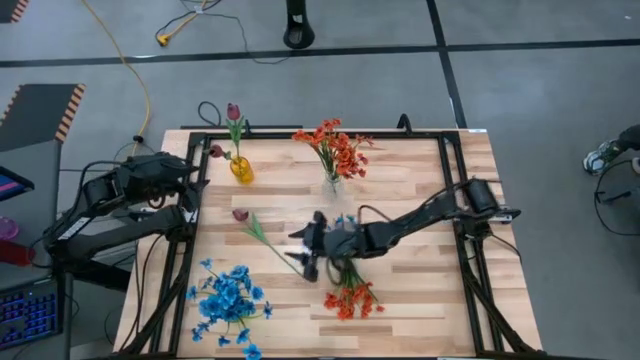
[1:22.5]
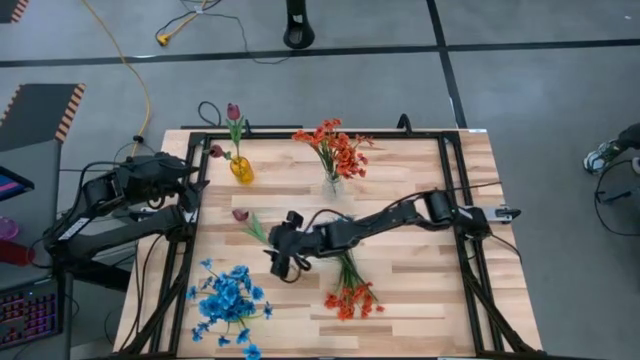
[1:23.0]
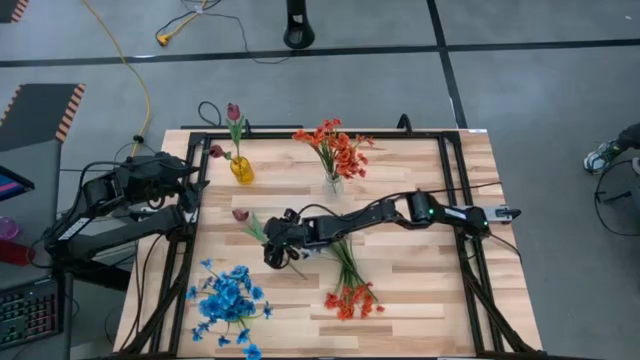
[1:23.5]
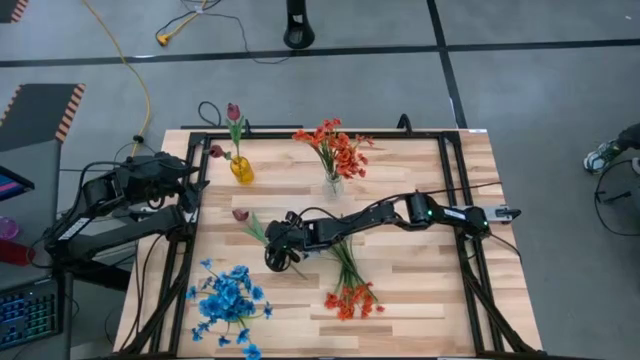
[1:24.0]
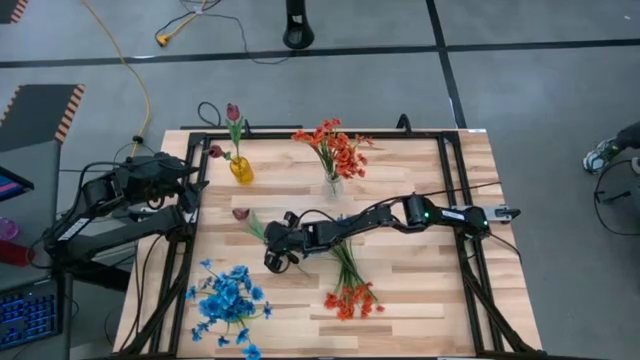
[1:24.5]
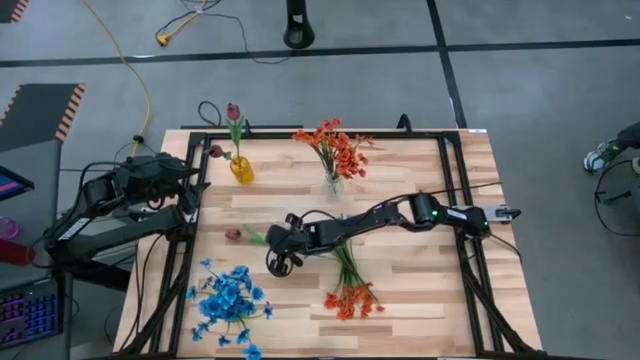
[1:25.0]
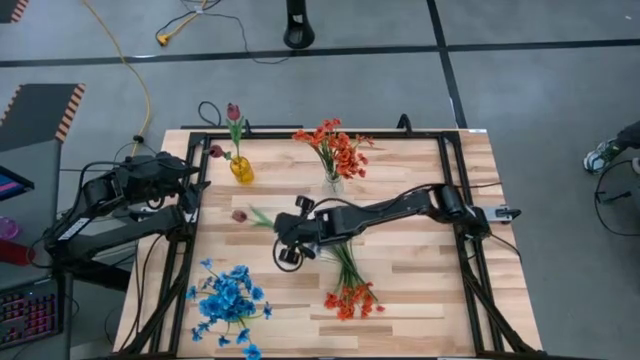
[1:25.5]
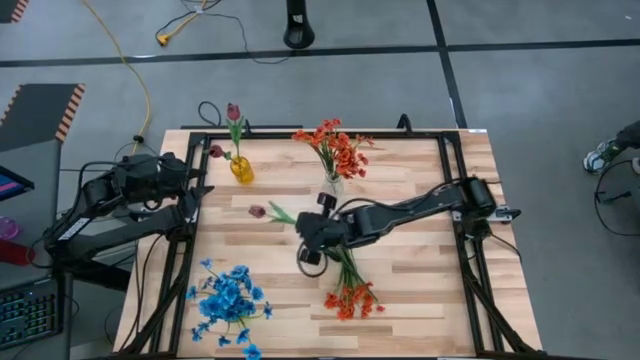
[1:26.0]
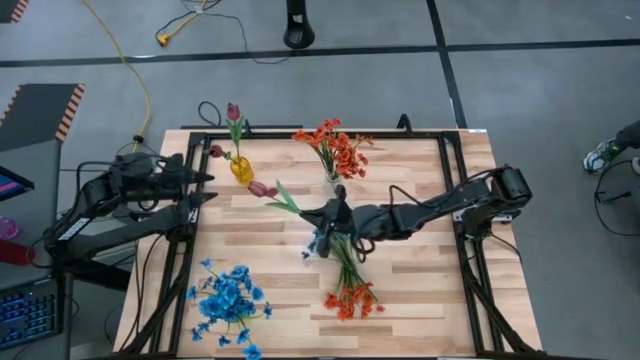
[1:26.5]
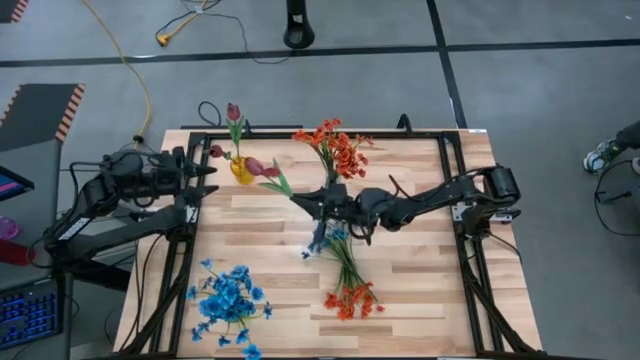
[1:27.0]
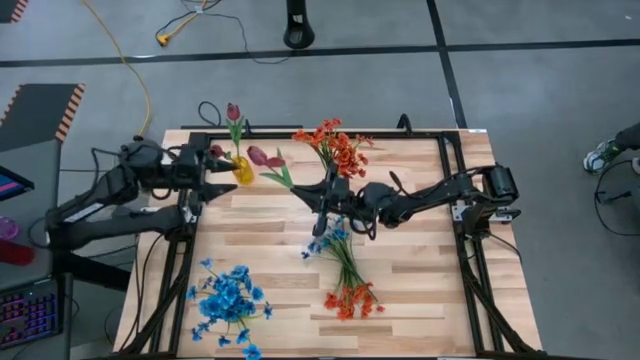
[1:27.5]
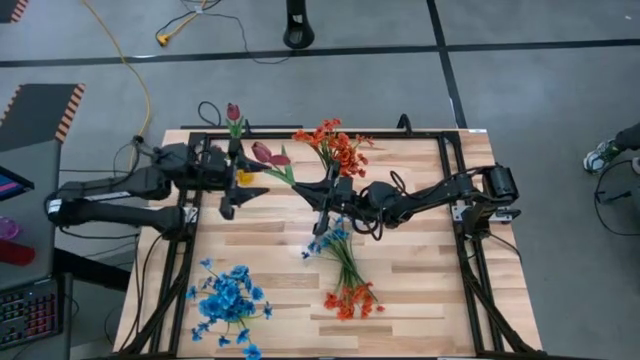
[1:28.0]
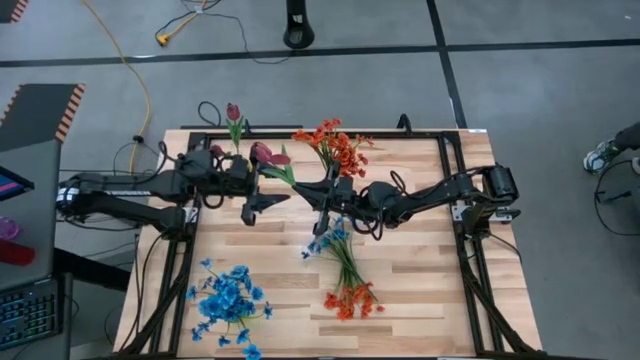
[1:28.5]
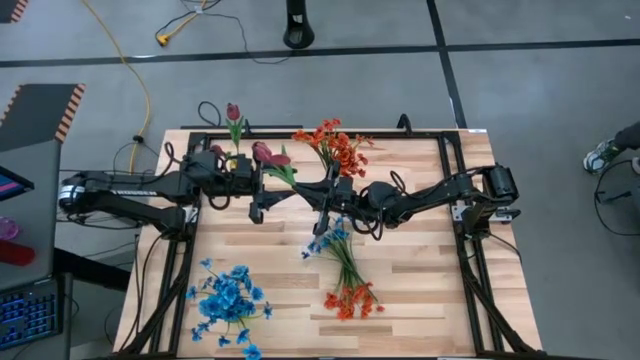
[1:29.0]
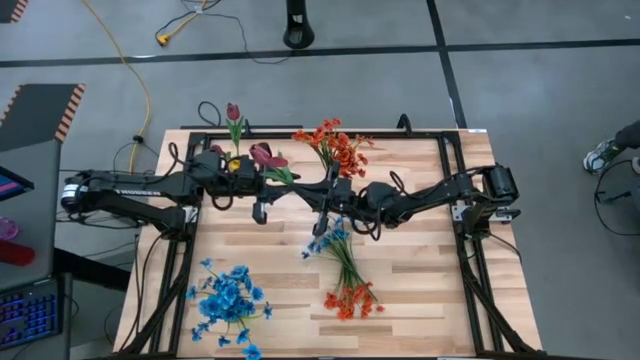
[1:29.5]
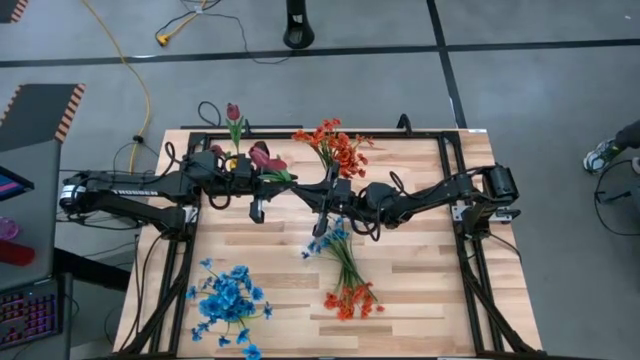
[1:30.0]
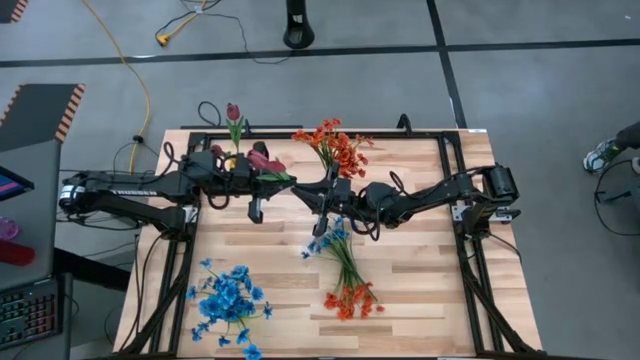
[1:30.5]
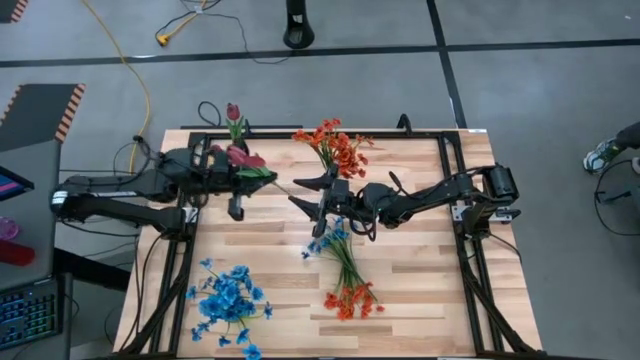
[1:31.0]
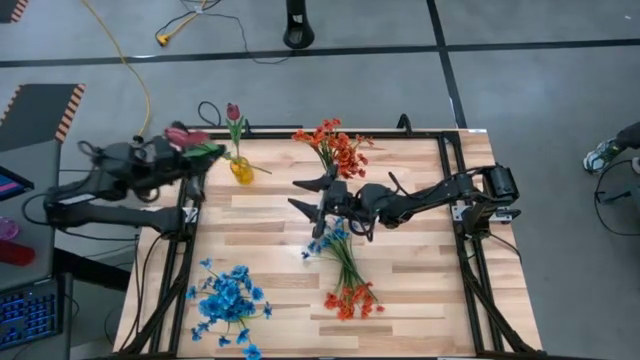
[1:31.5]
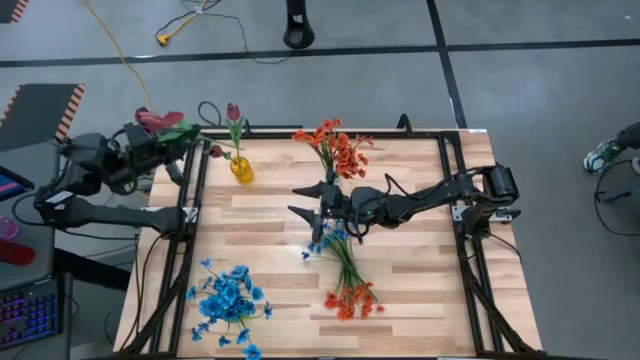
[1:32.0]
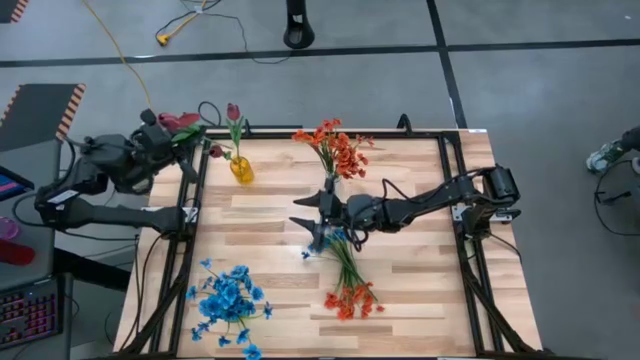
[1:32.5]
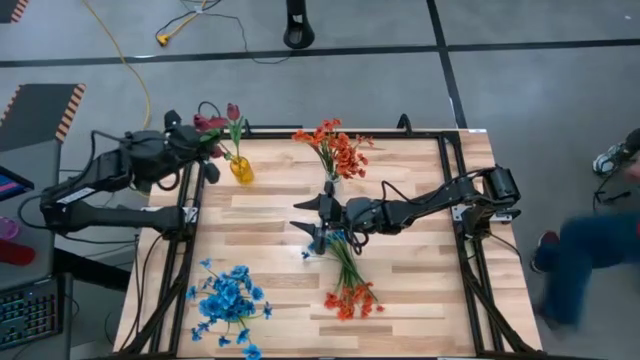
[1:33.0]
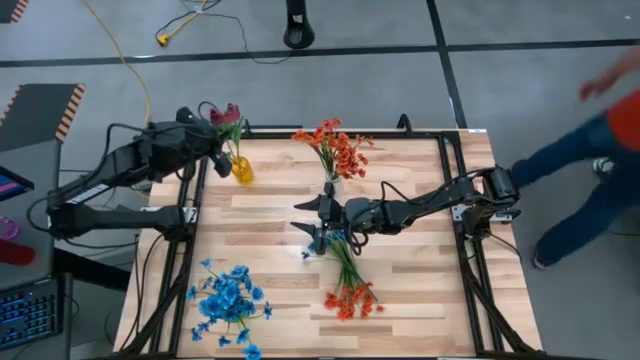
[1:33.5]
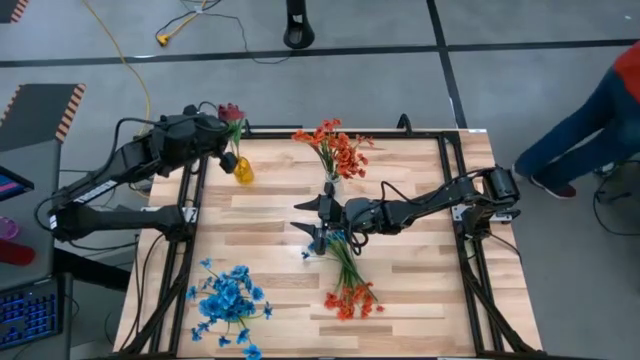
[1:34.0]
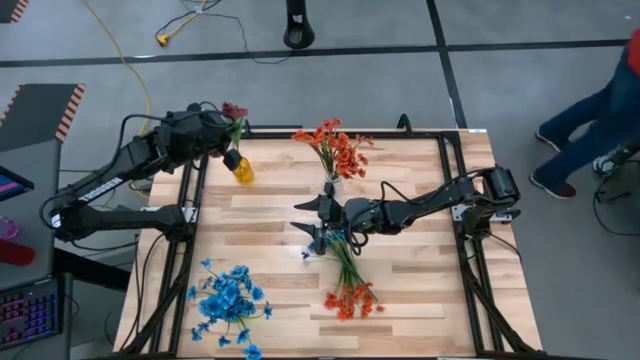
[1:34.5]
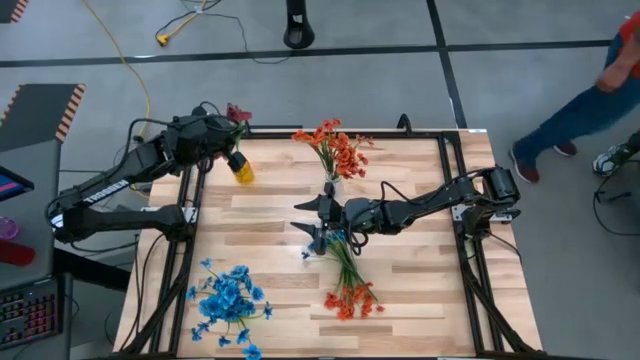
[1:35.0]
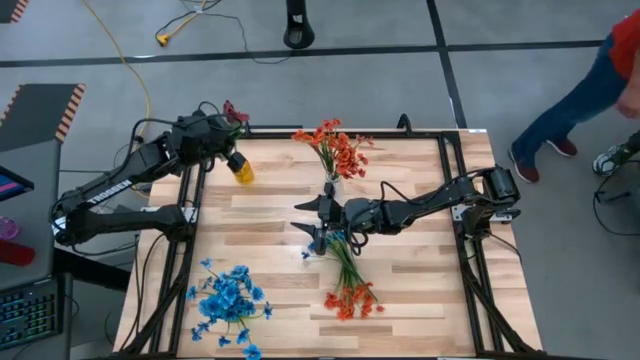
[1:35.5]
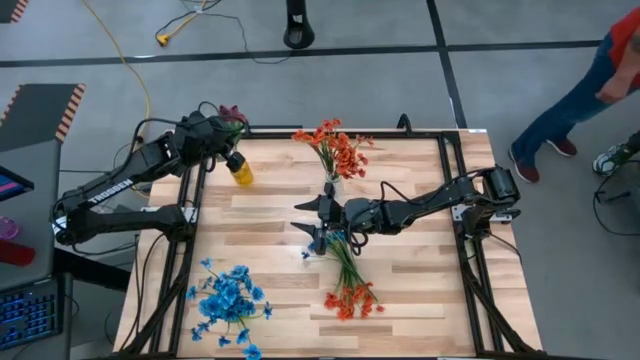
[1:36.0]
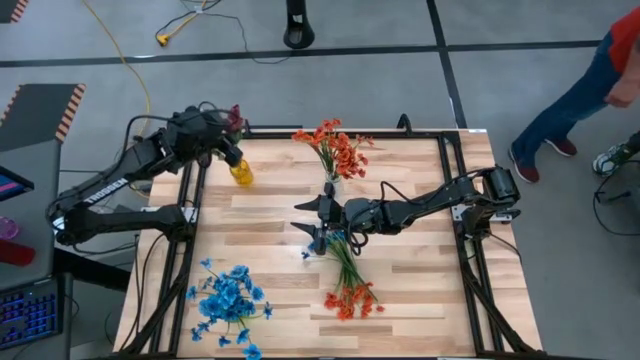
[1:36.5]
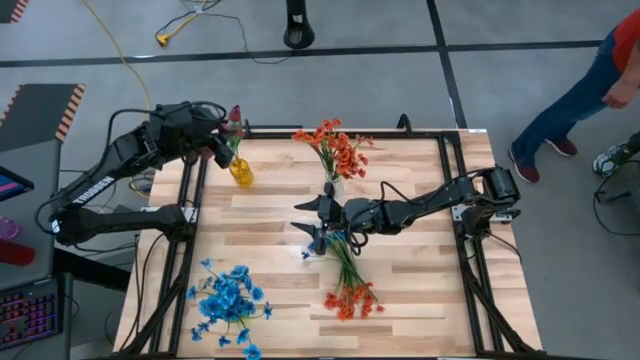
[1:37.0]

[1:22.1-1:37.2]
Task: Sort flowers into vase by color
Put the red flower into the yellow vase

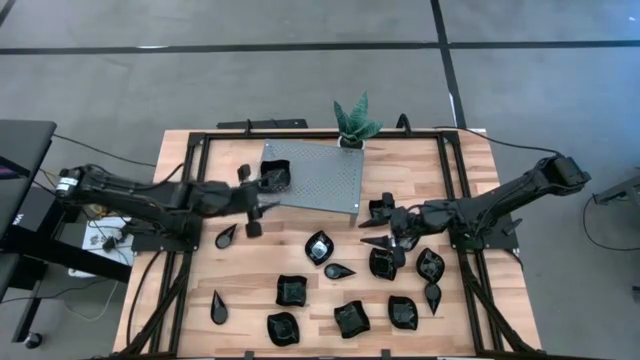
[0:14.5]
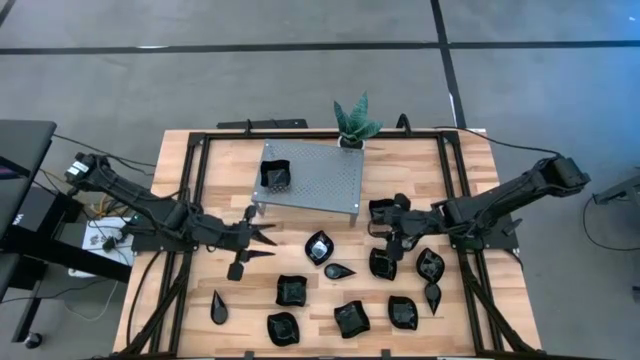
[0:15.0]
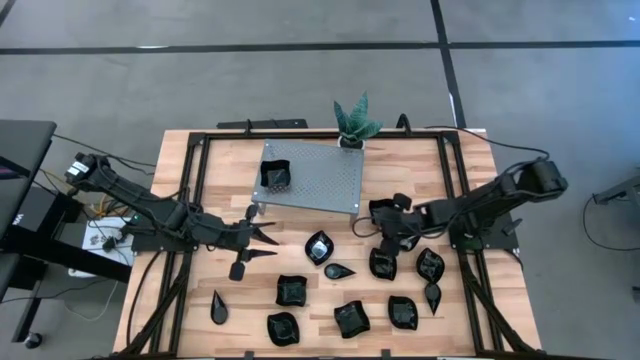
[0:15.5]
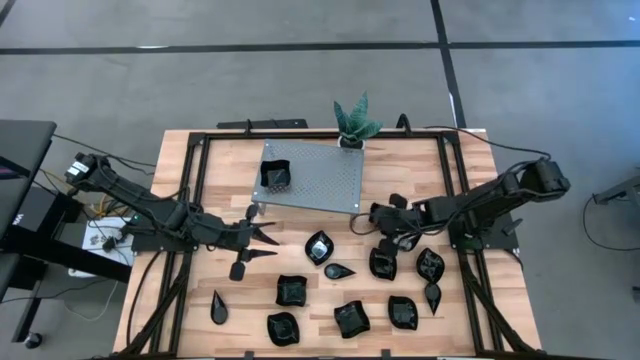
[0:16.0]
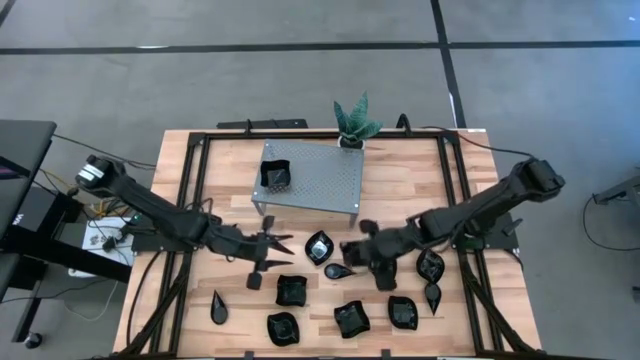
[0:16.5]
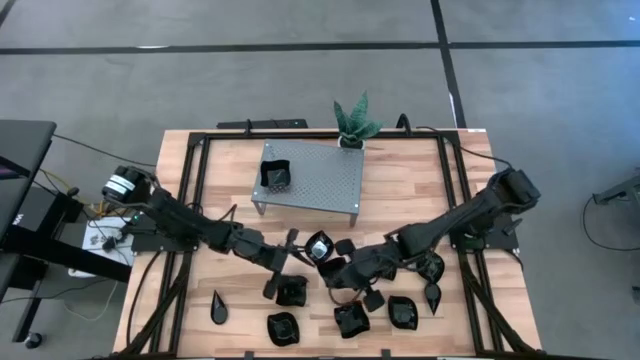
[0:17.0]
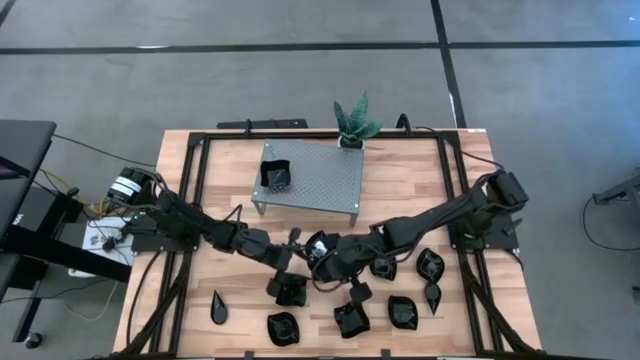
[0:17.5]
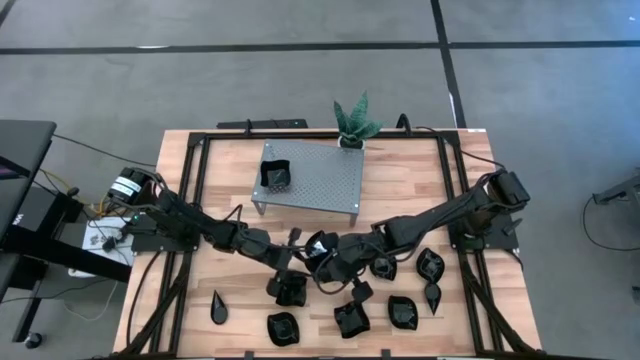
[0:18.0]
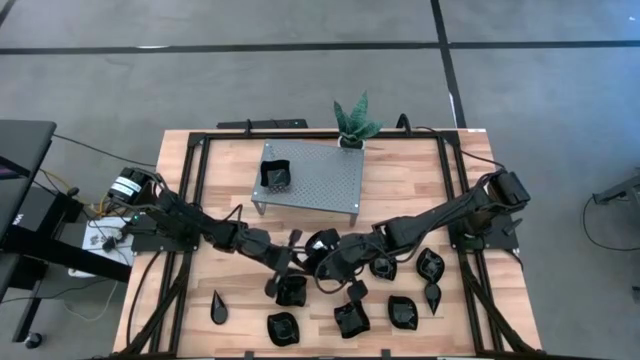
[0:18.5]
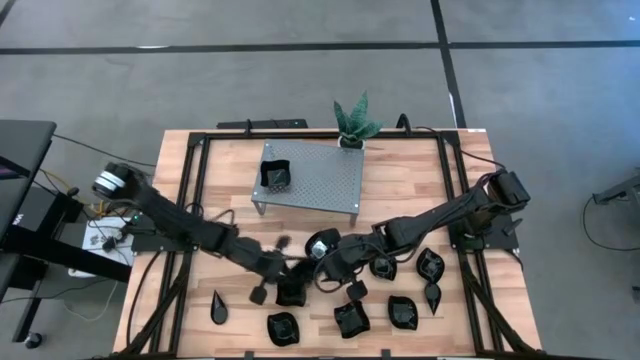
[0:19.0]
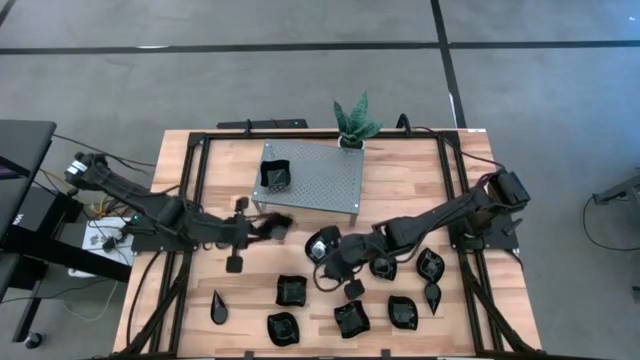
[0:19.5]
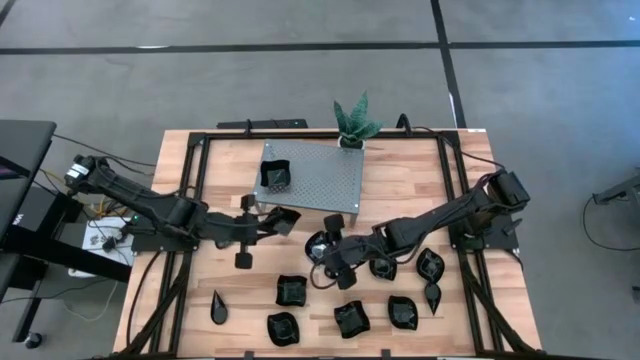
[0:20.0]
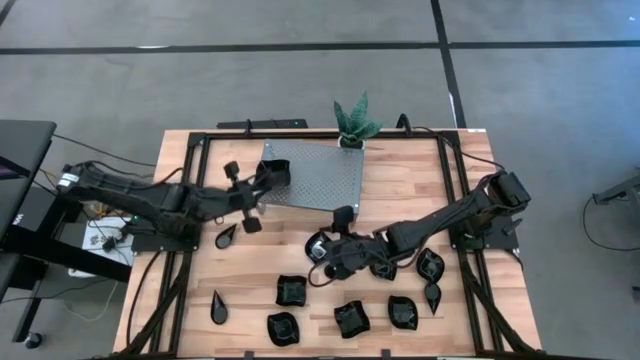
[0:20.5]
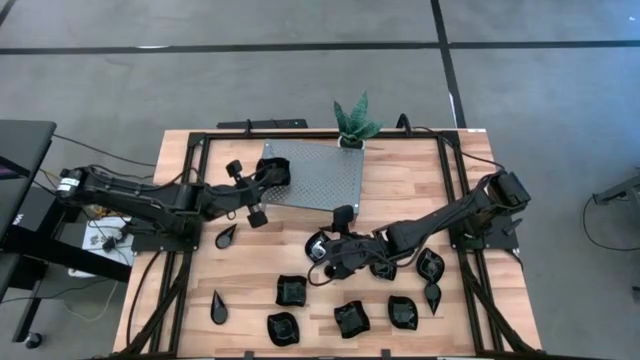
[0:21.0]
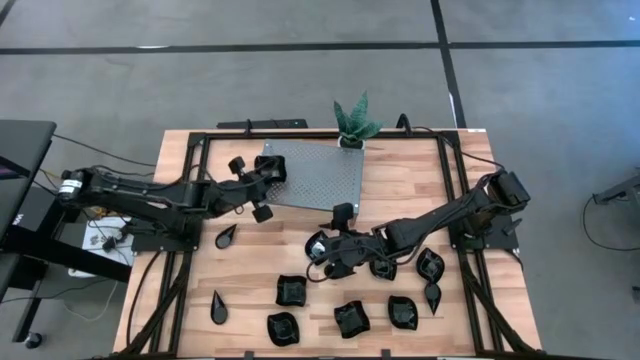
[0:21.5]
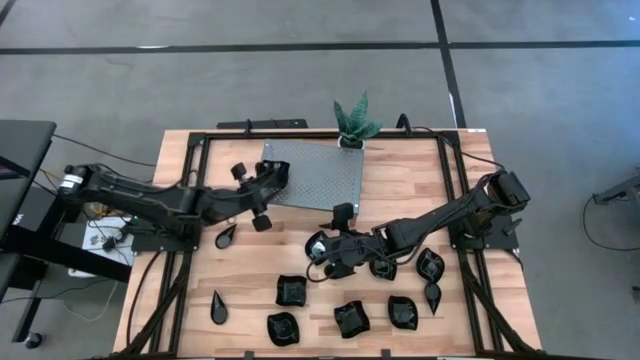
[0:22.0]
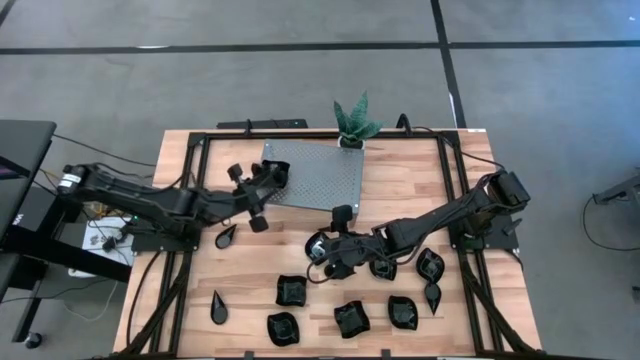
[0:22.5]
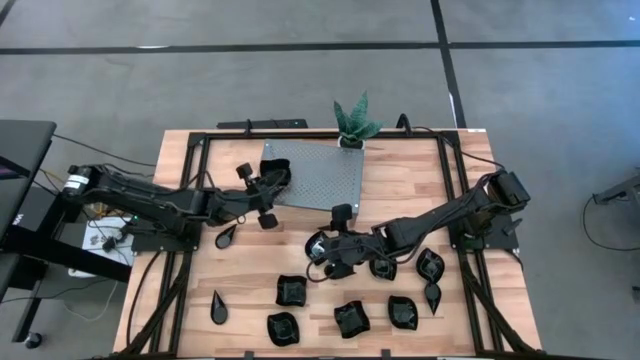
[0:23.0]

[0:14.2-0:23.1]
Task: Pick & Place Mini shaped plates
Stack the black distorted square plate on top of the black distorted square plates on the shelf
